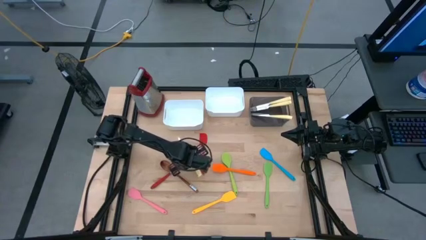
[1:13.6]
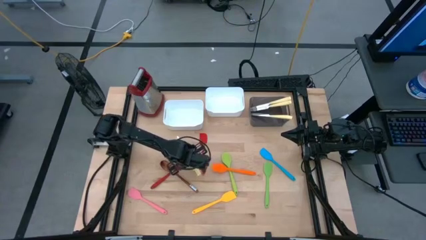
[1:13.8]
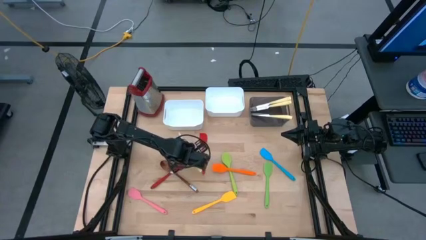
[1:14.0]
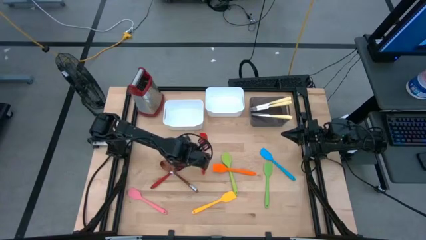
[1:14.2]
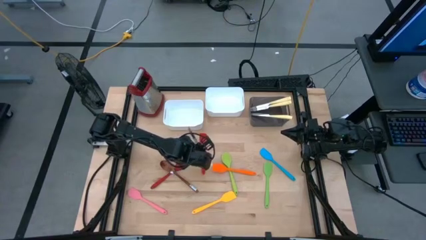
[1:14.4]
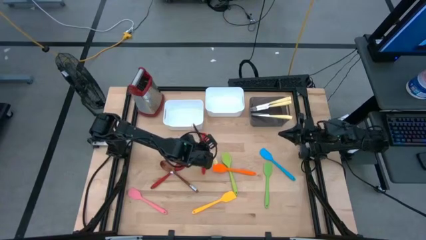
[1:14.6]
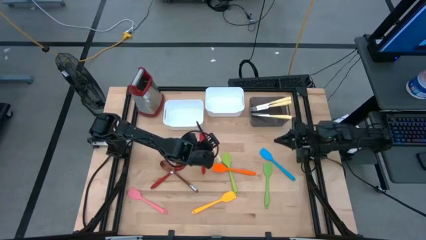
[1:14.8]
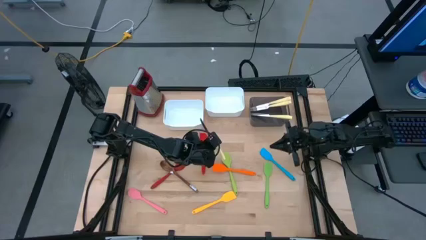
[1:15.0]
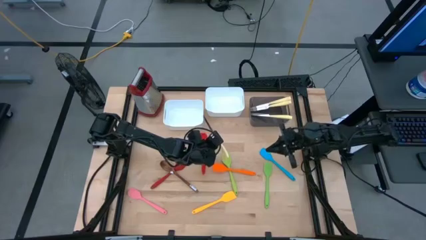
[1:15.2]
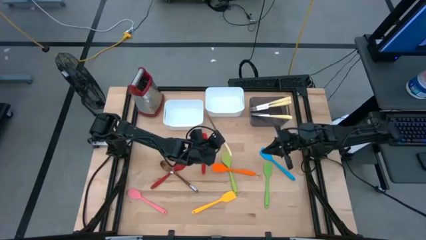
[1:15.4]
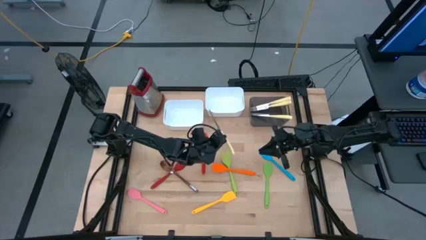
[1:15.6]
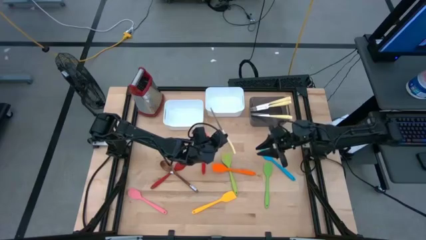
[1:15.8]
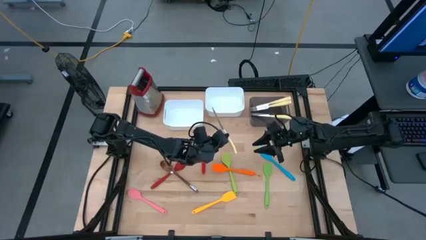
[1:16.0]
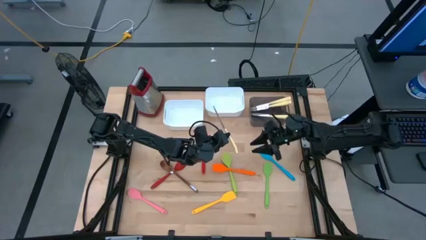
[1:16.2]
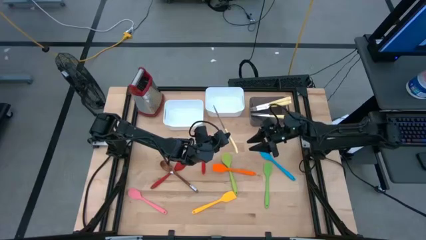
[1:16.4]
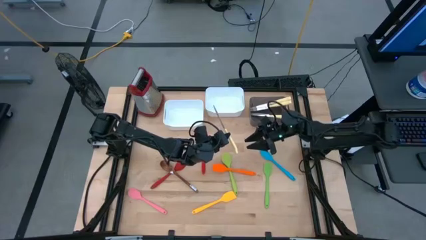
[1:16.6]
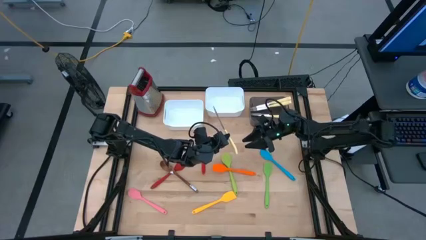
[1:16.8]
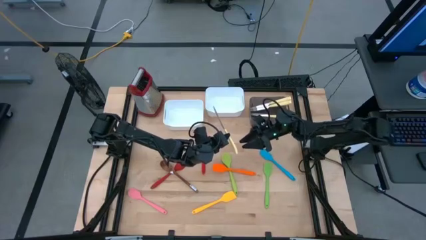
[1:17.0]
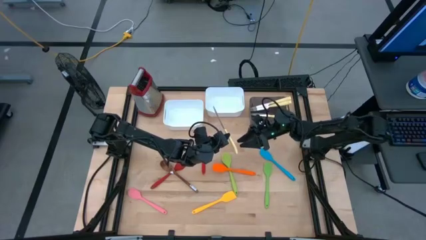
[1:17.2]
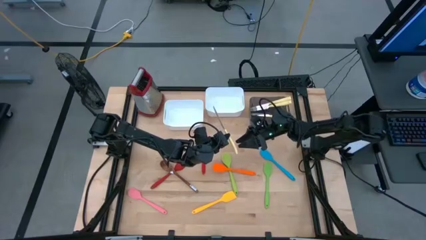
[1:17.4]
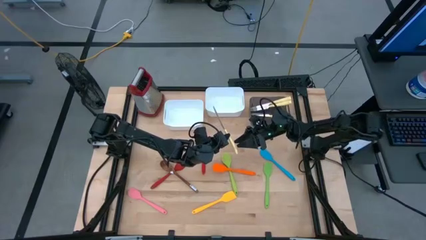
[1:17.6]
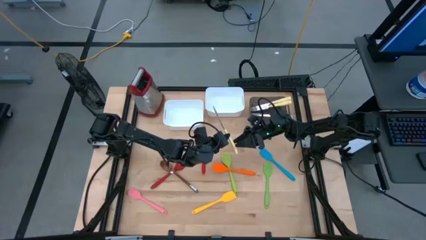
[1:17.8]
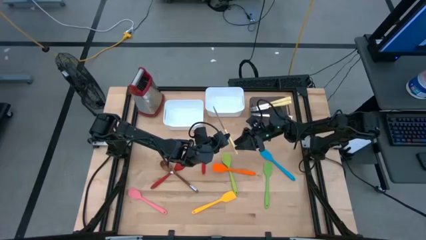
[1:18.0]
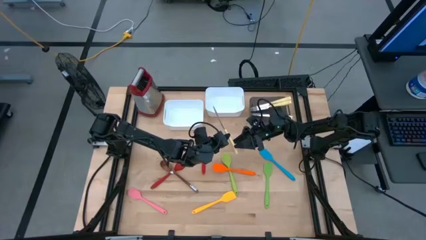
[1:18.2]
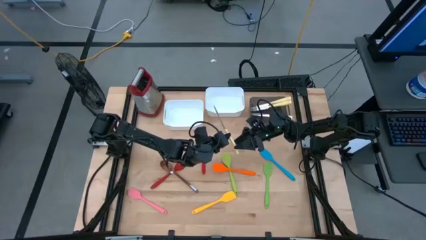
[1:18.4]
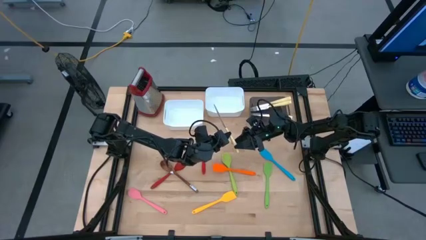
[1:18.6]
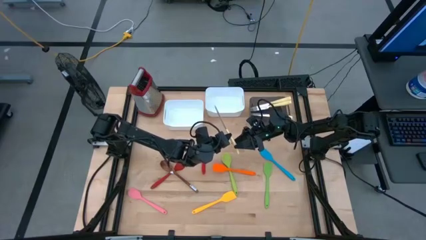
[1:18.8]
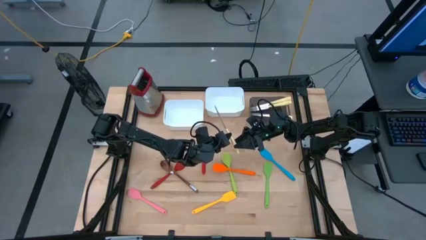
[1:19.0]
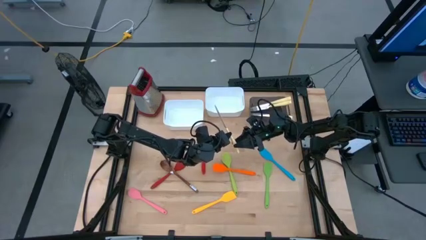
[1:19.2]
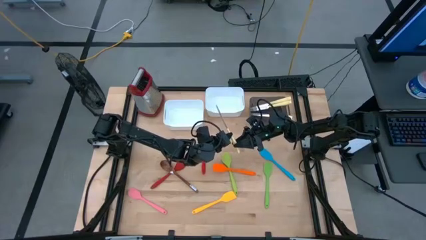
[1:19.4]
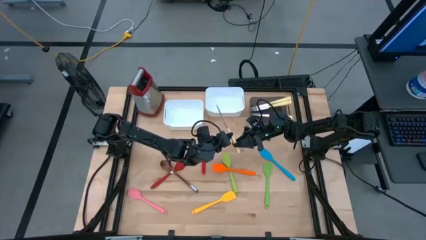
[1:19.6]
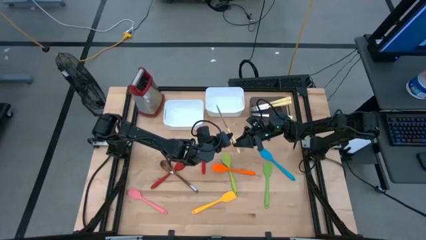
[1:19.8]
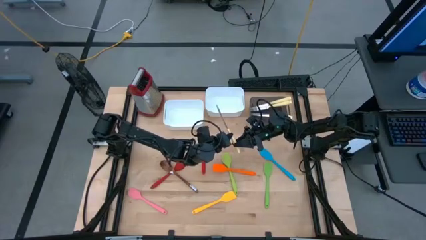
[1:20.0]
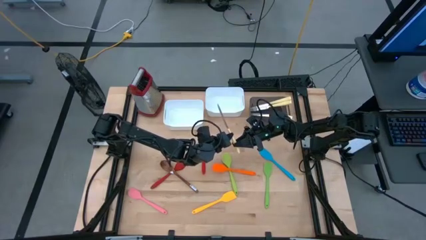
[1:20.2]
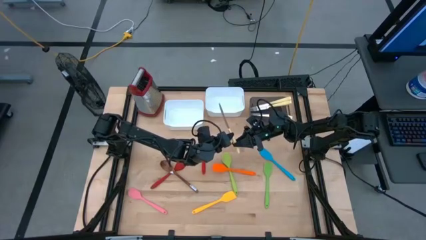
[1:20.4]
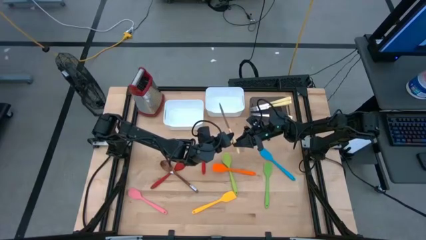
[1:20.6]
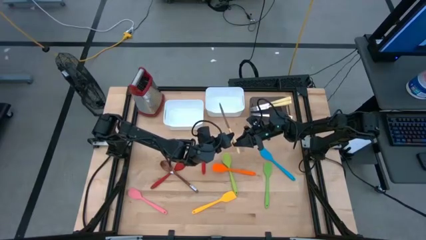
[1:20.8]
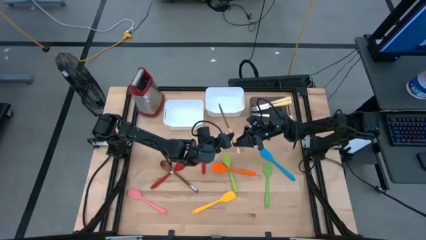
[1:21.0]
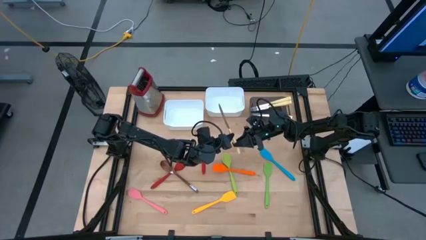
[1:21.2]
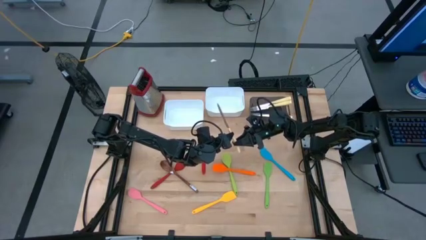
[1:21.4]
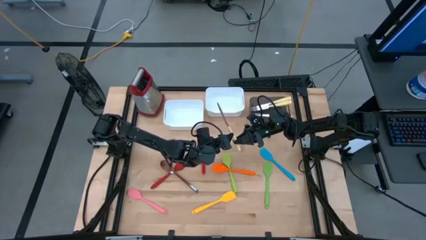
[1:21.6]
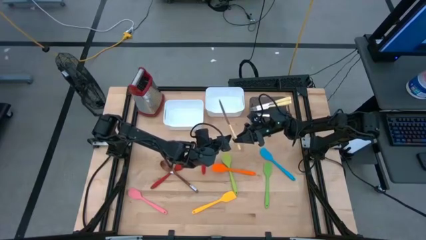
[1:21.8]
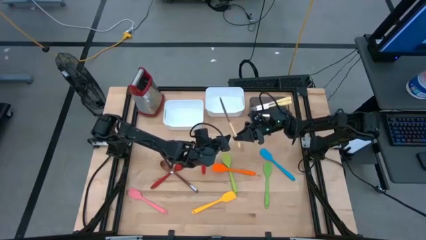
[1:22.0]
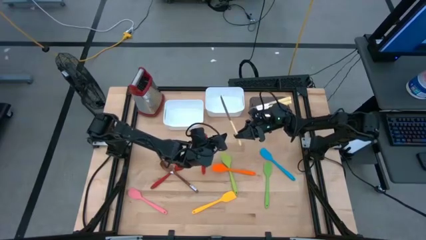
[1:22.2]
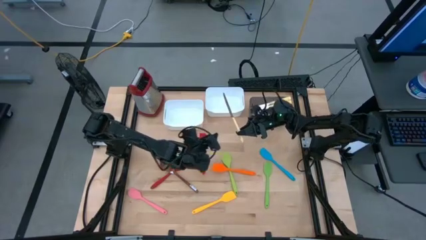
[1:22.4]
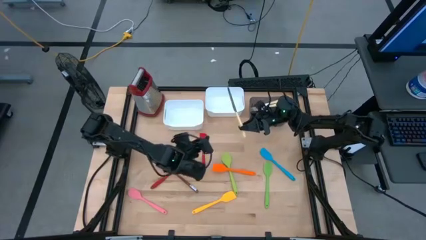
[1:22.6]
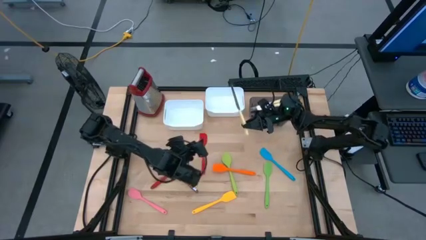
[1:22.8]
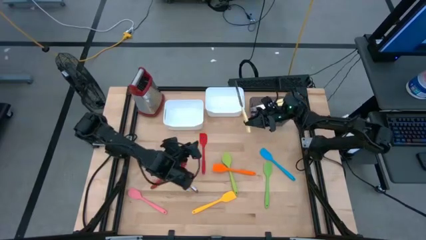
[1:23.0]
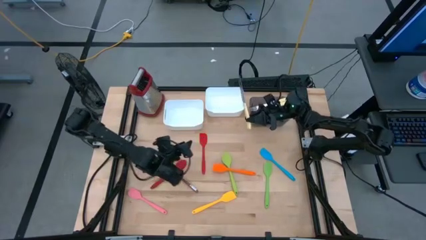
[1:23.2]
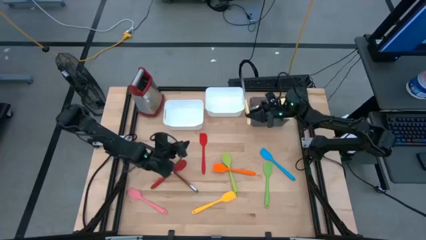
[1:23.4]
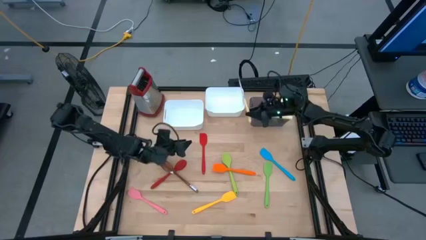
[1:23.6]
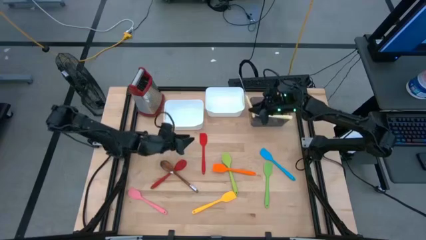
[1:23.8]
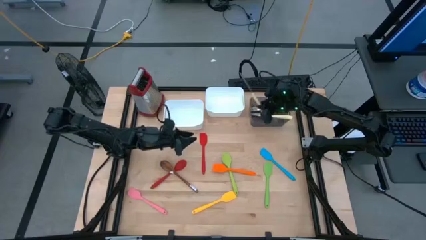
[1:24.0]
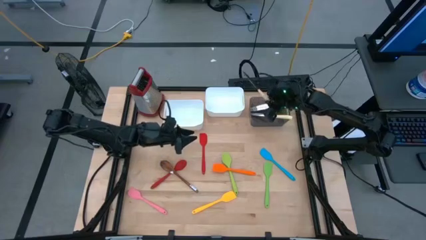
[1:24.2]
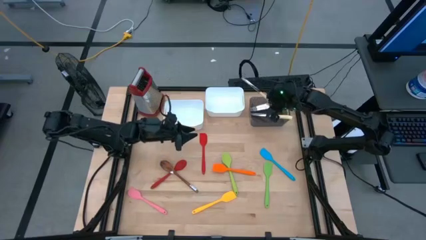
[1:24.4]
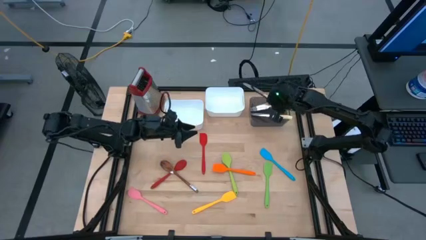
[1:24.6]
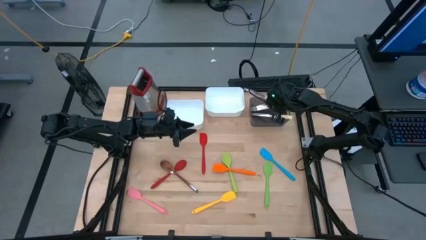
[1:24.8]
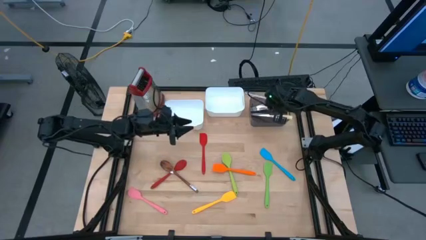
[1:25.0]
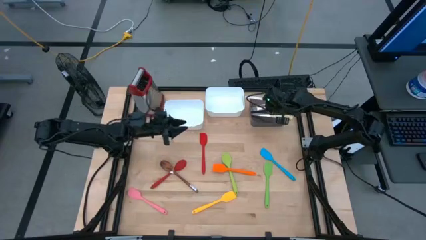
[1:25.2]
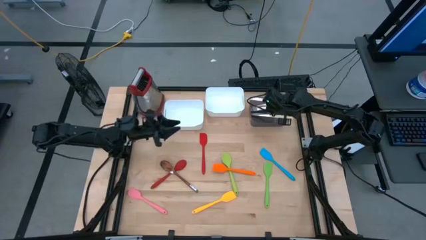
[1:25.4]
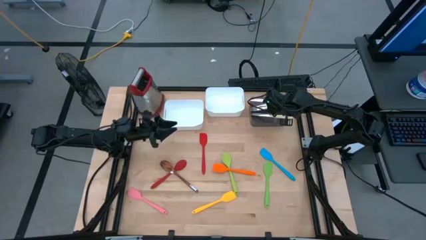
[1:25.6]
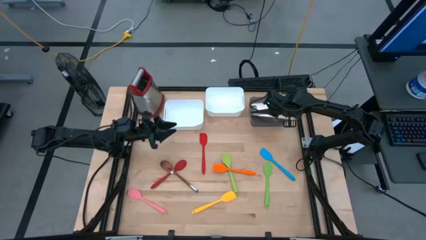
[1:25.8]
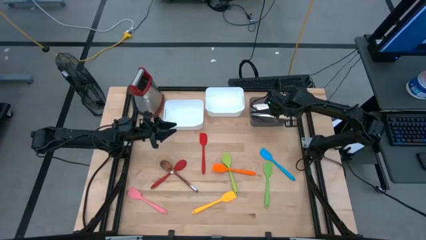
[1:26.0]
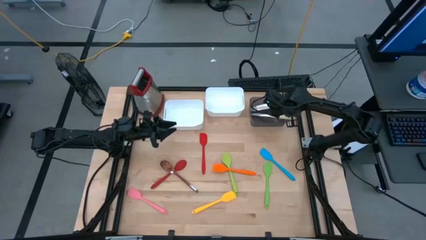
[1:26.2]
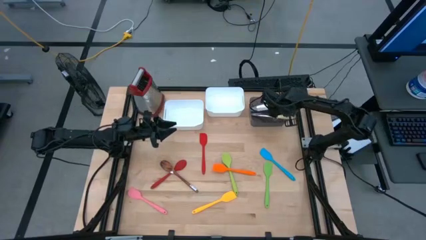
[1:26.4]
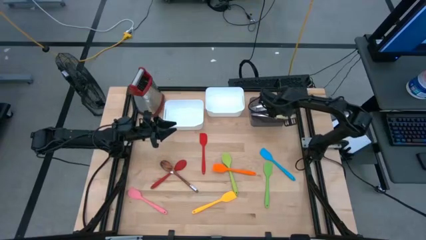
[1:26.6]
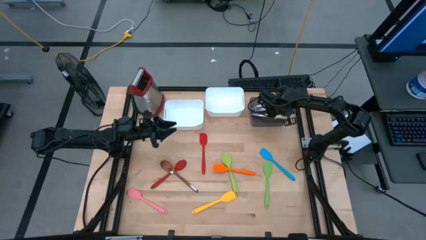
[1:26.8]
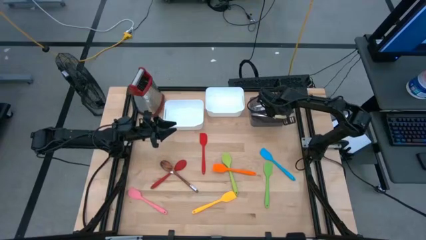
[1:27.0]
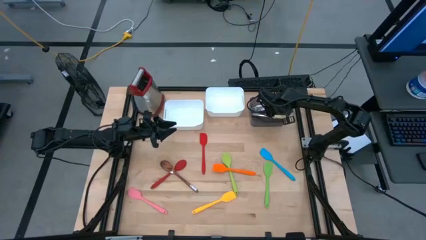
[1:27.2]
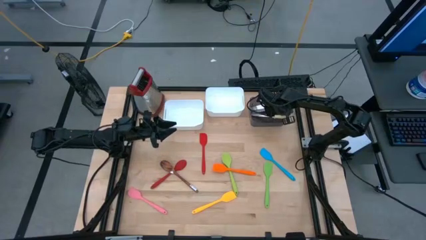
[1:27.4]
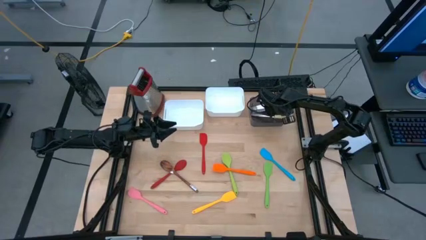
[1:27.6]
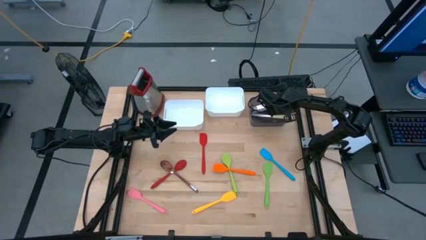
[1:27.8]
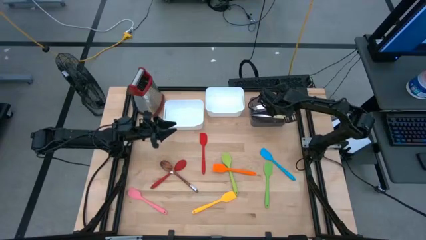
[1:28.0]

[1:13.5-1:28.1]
Task: Pick & Place Kitchen Items
Put the yellow knife into the black bin
